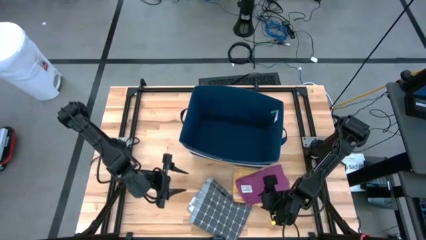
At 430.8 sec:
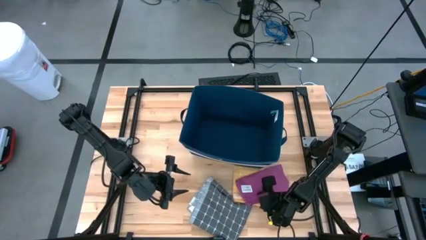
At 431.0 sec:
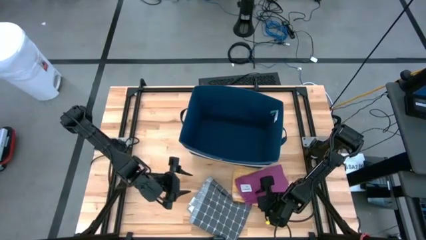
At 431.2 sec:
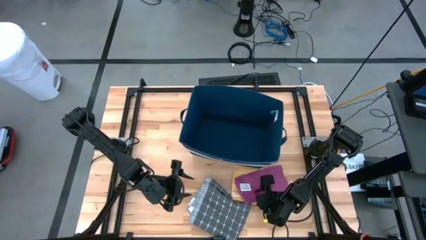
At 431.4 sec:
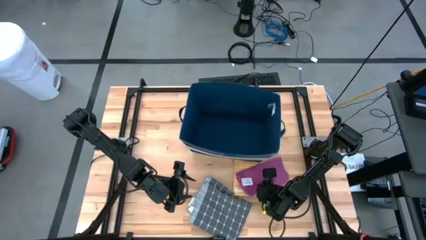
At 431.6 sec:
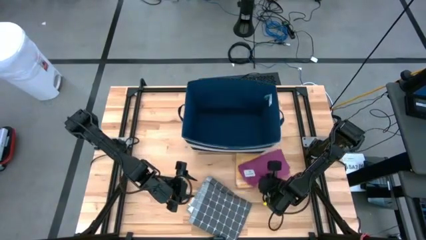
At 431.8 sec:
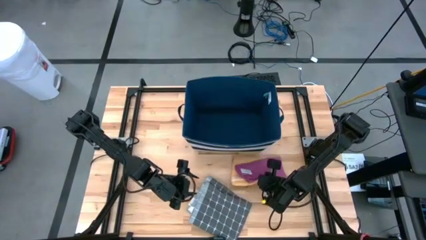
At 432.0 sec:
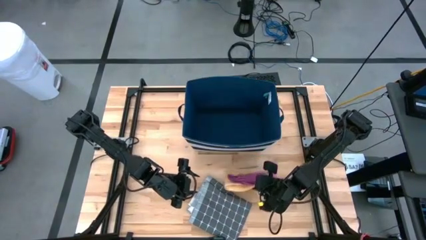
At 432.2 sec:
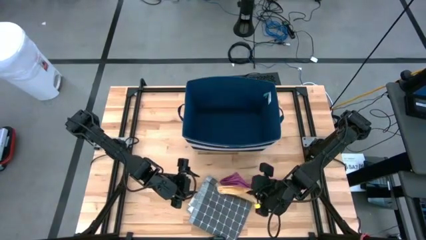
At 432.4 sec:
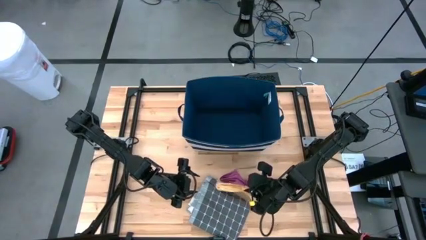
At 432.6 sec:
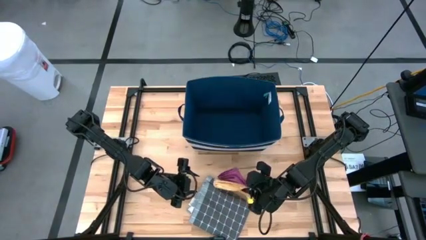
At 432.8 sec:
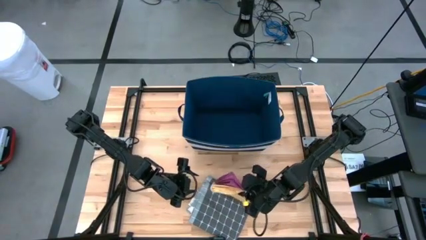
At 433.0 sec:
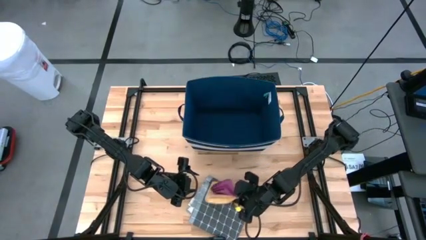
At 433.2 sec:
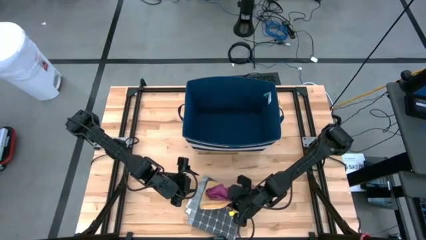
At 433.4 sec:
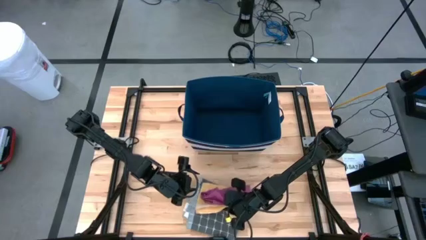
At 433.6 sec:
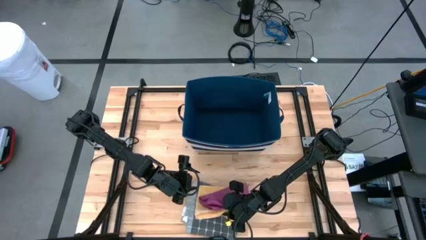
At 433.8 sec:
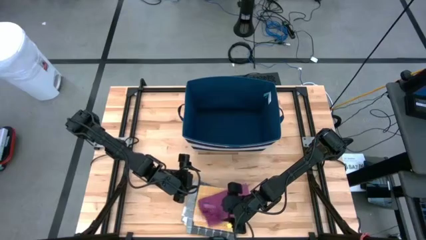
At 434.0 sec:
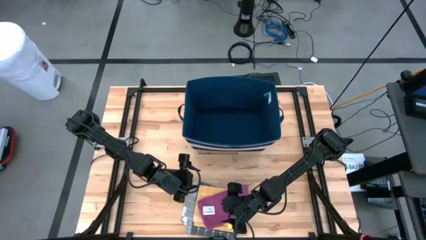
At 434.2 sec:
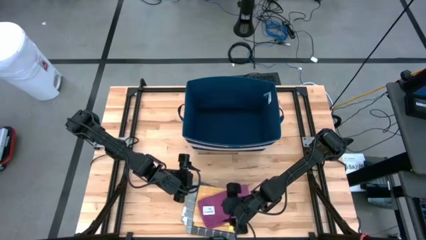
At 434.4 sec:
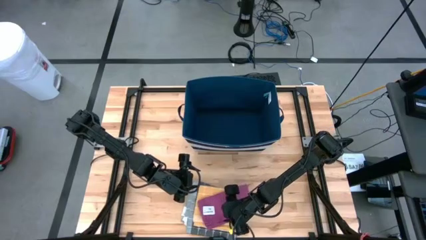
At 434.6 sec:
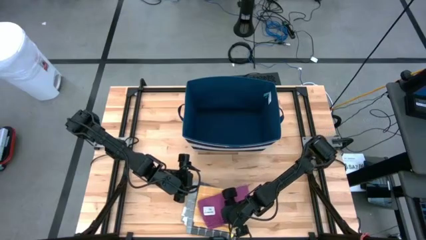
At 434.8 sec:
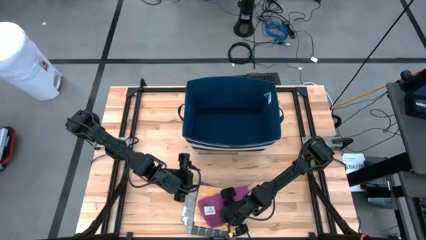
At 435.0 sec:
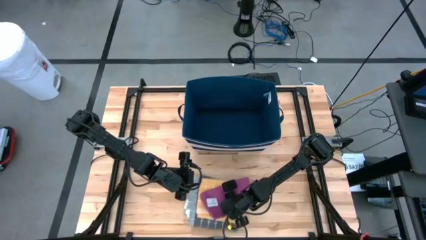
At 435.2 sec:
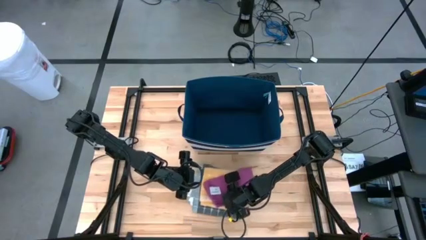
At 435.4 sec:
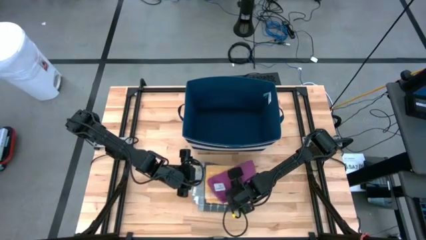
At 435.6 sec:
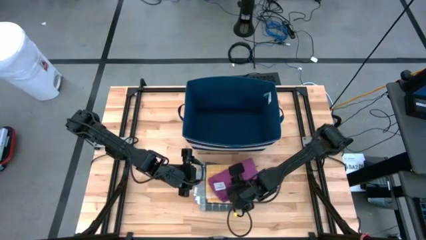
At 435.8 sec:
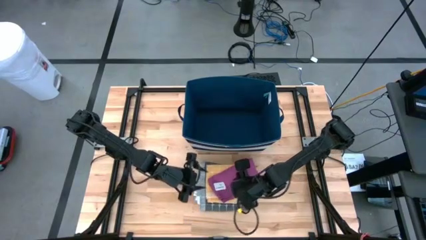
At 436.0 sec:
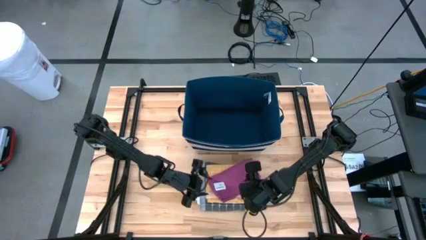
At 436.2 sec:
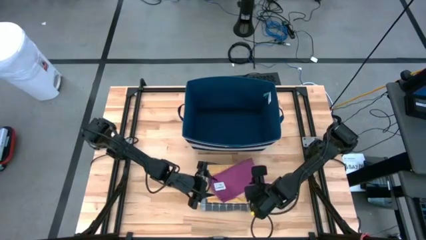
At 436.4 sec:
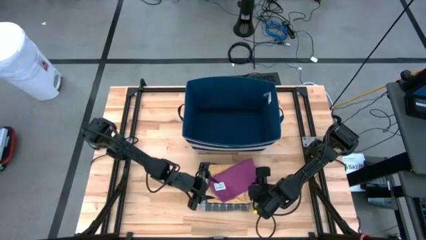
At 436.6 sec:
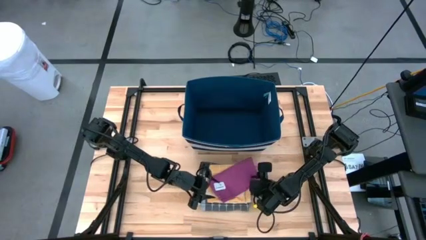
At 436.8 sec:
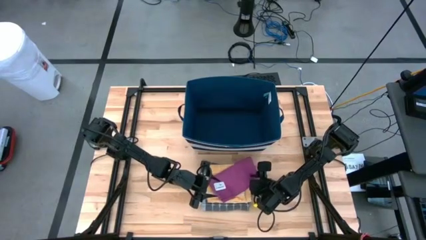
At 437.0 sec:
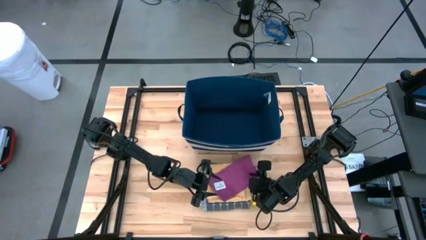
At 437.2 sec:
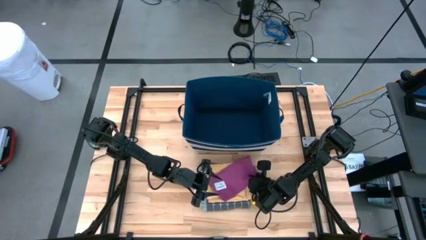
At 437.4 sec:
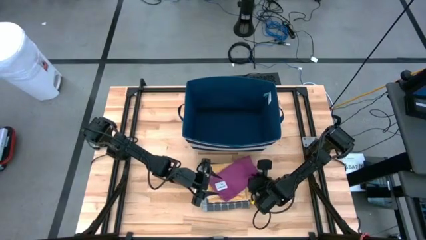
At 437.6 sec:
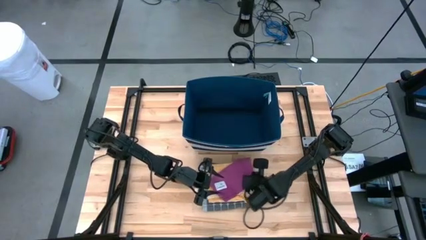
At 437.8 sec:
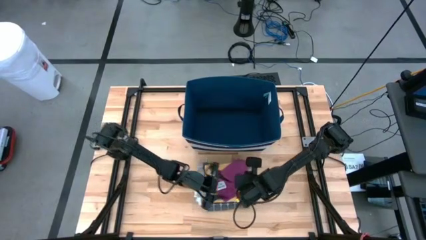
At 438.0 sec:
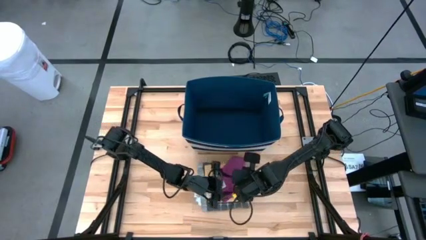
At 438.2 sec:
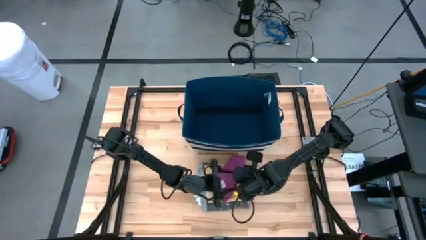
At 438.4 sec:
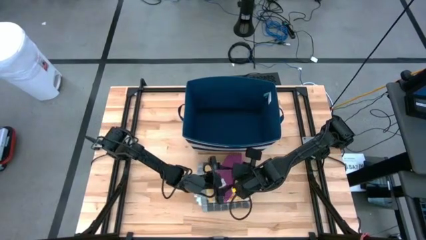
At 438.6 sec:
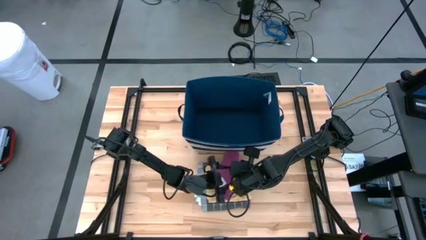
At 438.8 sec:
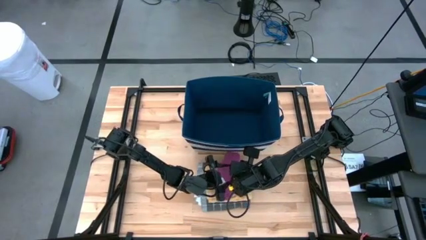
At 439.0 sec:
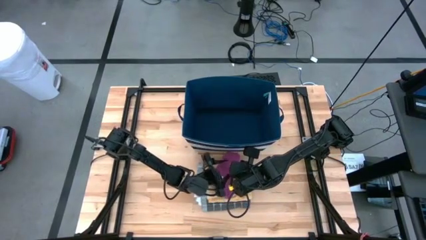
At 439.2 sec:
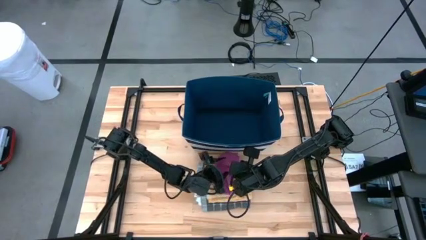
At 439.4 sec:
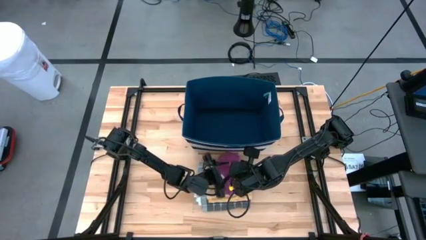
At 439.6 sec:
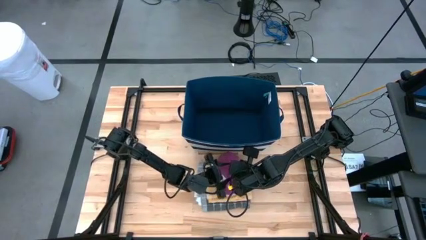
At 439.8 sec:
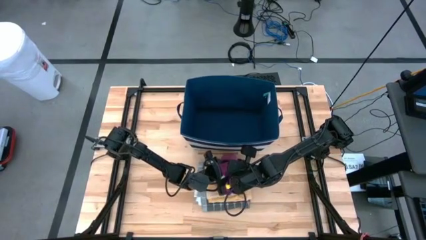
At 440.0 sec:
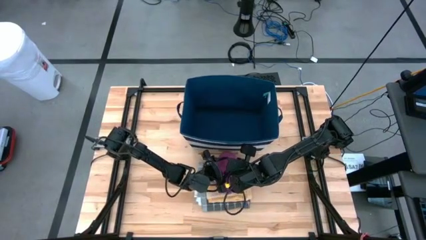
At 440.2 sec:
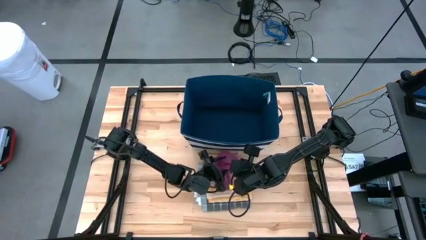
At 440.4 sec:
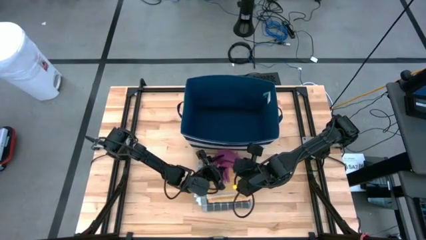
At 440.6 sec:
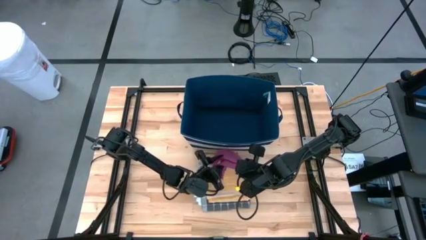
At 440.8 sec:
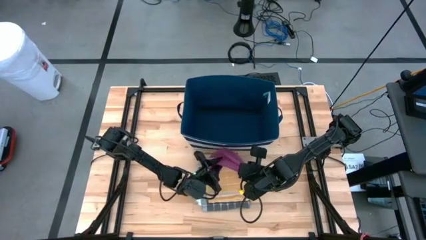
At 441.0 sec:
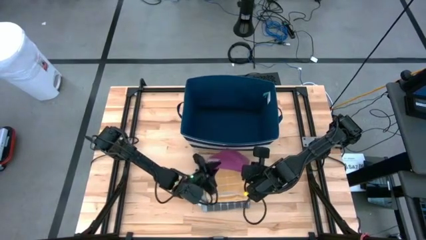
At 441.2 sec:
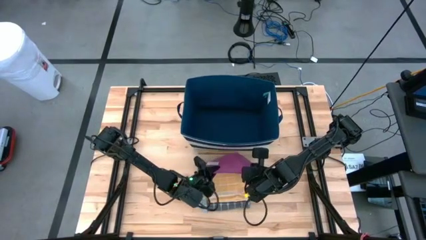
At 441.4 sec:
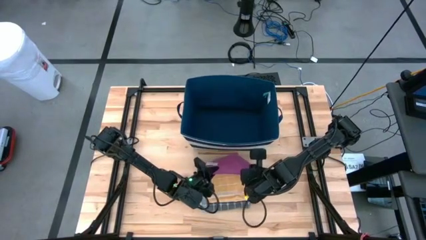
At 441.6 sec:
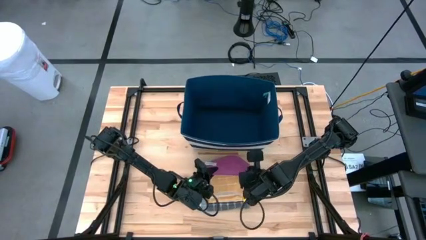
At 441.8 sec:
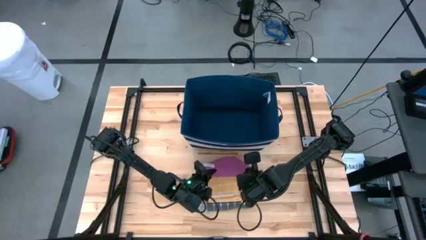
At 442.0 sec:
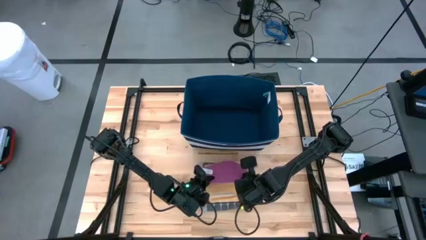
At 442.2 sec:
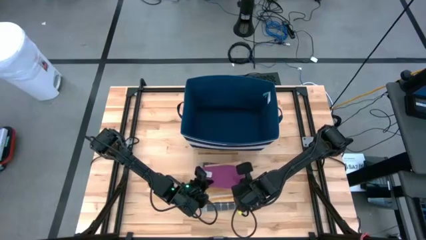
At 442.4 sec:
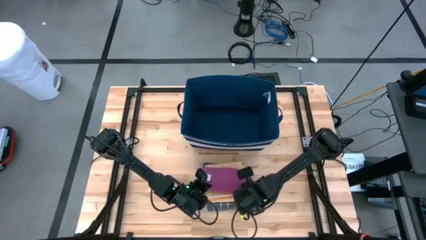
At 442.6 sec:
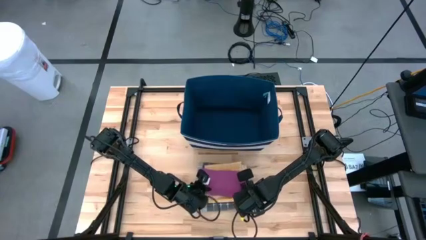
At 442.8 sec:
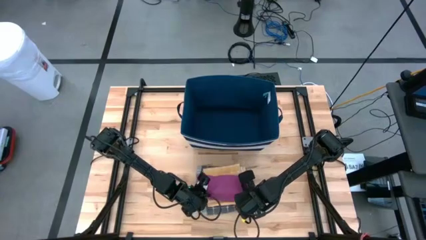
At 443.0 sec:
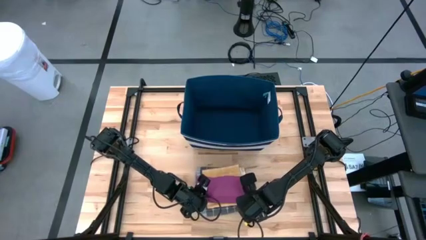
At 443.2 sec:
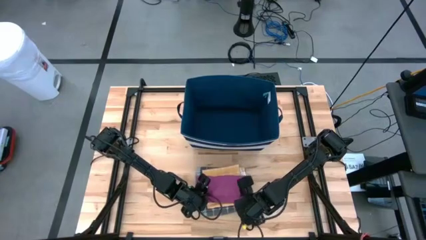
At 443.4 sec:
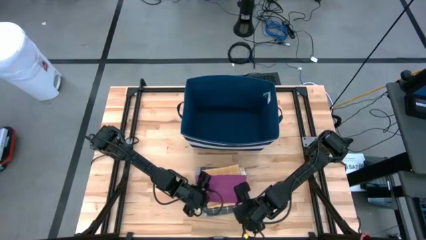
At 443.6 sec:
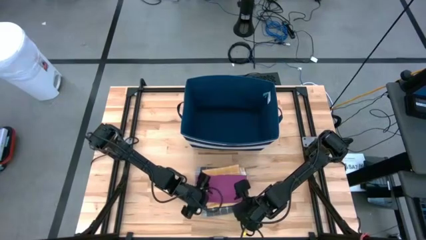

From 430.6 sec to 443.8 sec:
Task: Fold towel
Stack the stacked towels on the gray towel

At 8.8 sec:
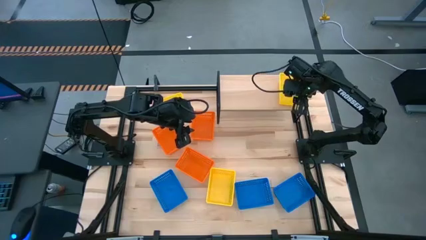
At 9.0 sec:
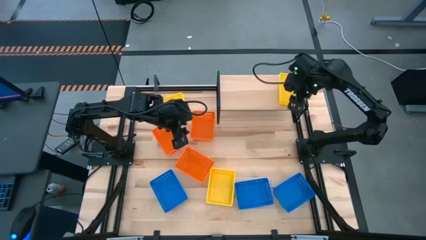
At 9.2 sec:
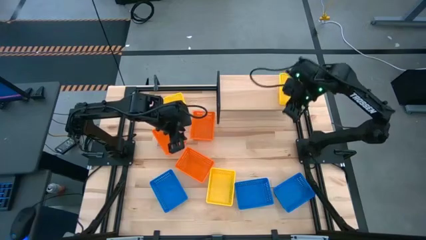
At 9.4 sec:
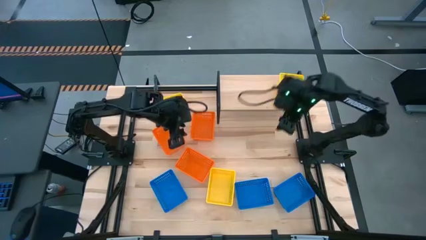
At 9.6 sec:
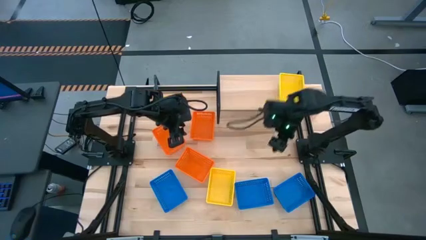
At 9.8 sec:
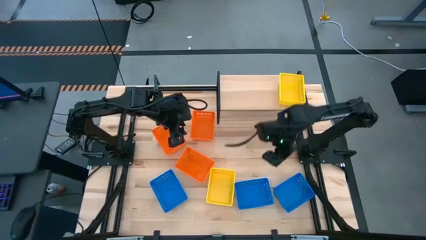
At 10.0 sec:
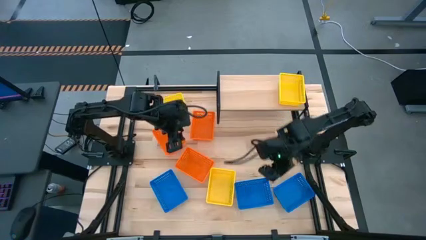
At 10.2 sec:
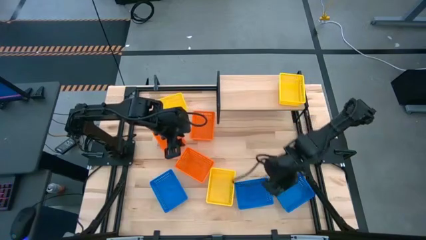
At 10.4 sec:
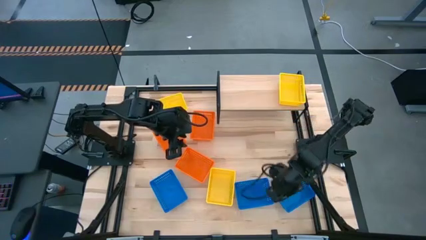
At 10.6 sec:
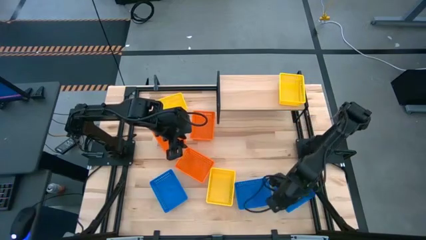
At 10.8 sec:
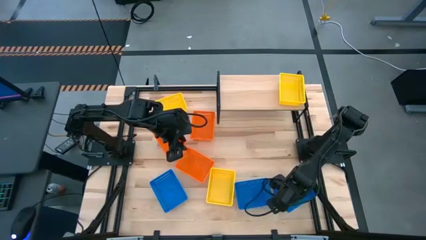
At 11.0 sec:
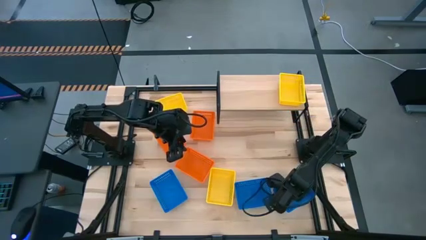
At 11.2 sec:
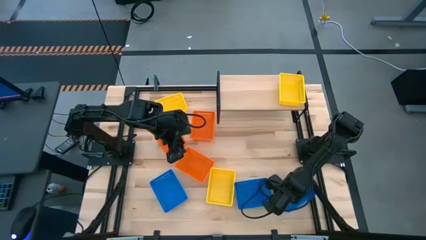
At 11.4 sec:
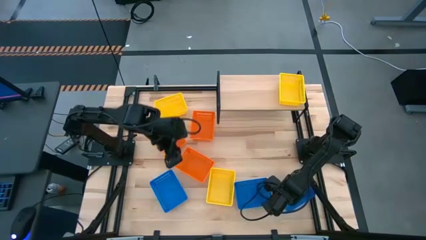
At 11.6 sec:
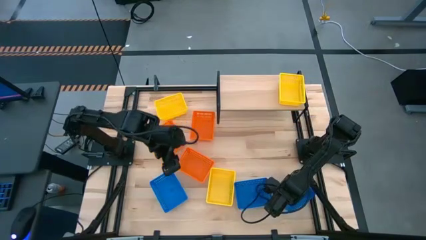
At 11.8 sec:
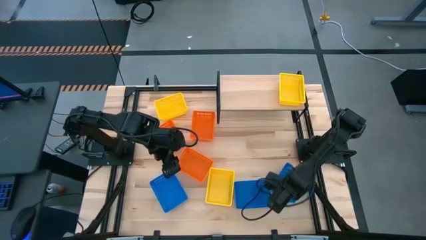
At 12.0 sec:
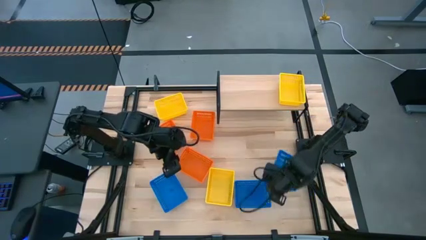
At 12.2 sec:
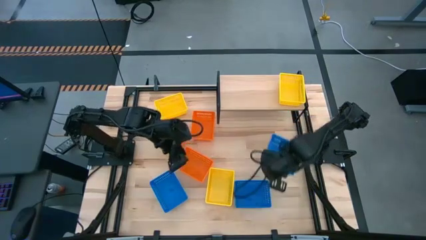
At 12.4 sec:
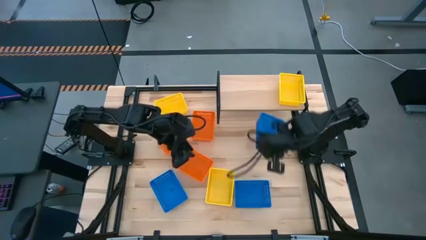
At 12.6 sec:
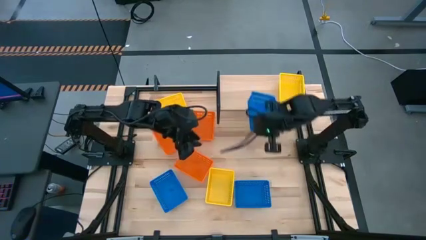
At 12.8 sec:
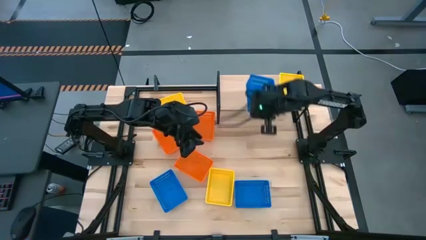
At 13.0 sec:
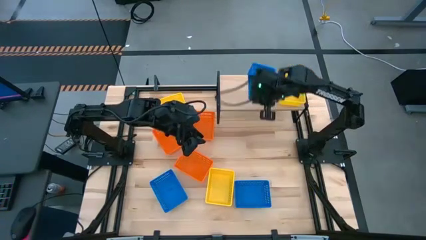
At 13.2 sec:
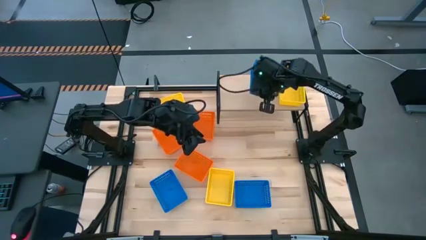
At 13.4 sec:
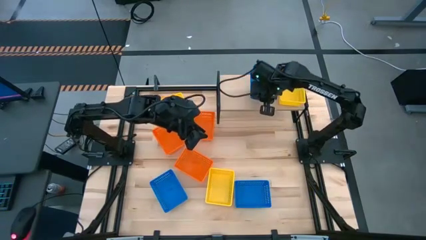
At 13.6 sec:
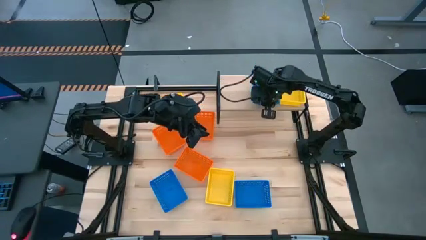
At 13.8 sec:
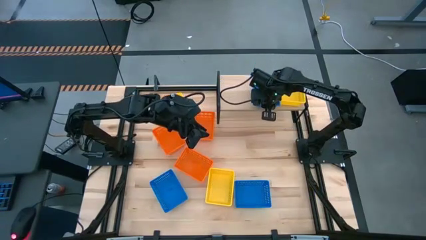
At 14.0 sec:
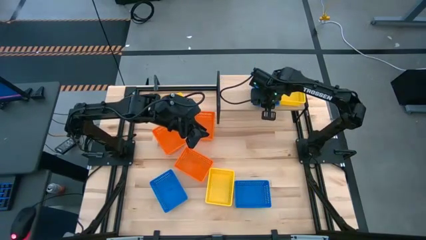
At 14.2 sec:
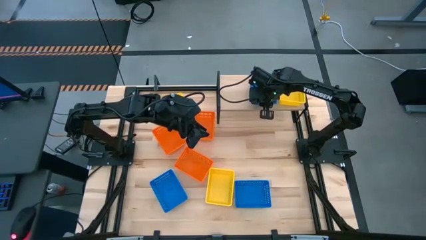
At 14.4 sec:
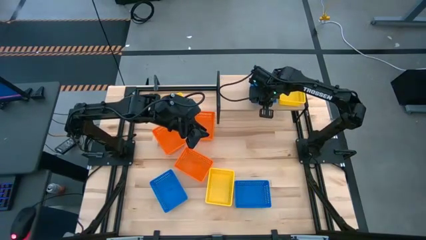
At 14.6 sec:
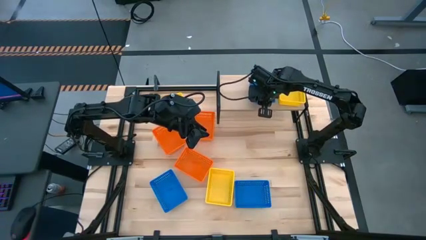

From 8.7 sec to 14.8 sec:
Task: Stack baskets on shelf by color
Put the right blue basket on the shelf
